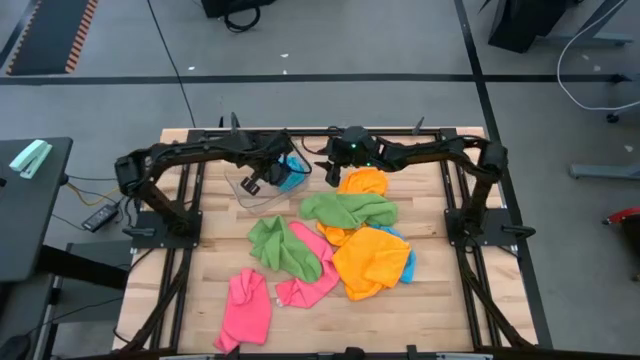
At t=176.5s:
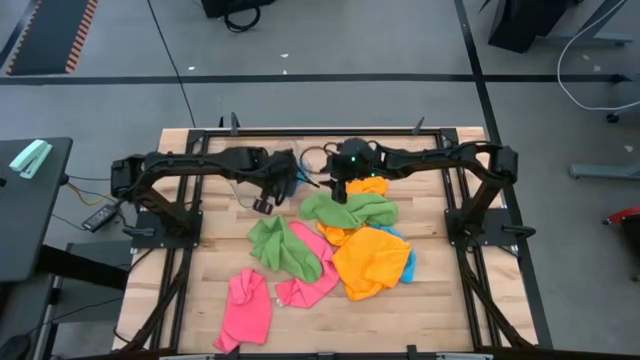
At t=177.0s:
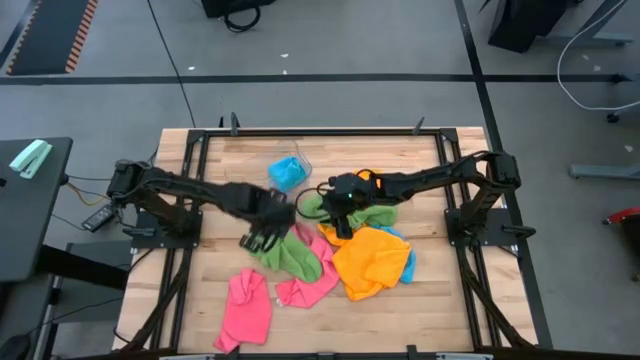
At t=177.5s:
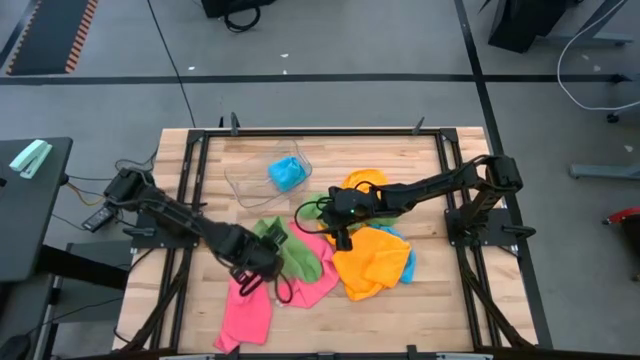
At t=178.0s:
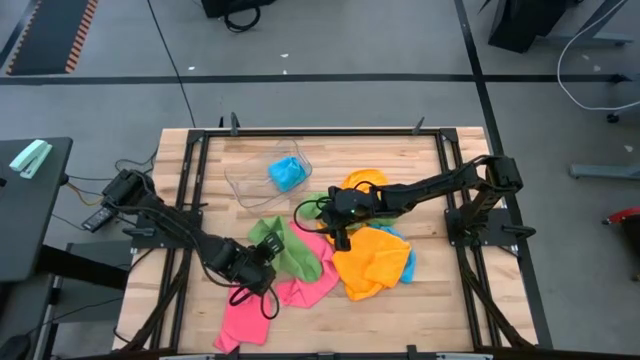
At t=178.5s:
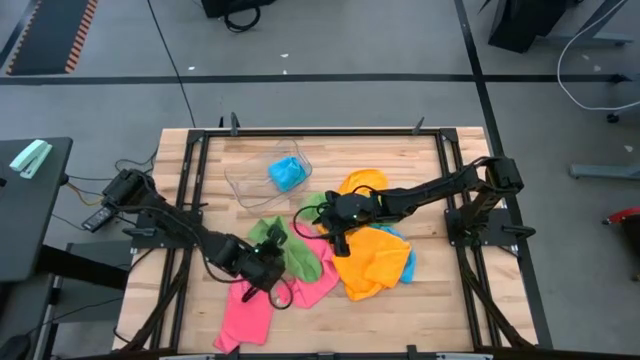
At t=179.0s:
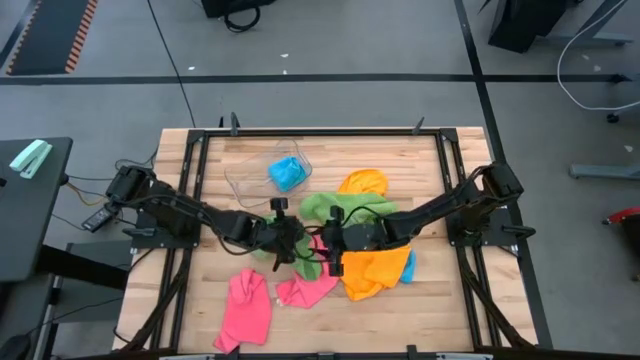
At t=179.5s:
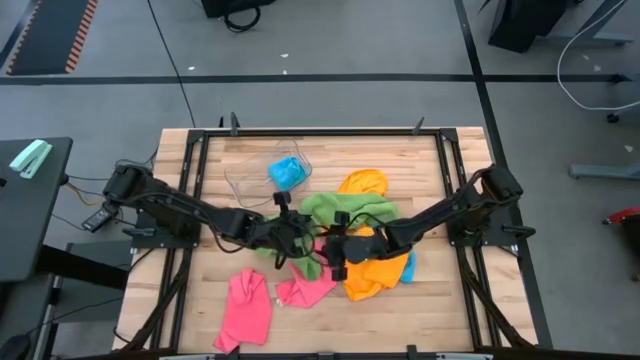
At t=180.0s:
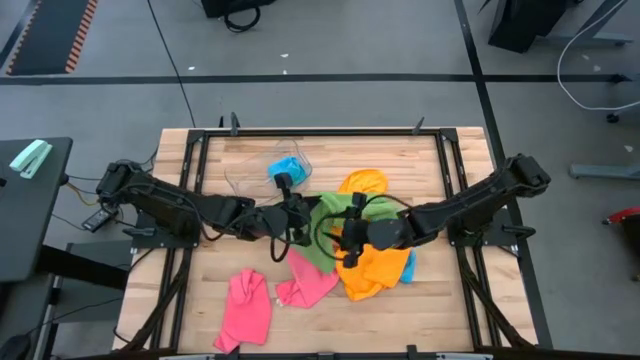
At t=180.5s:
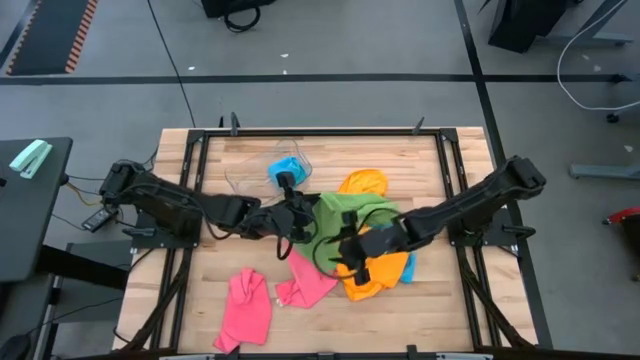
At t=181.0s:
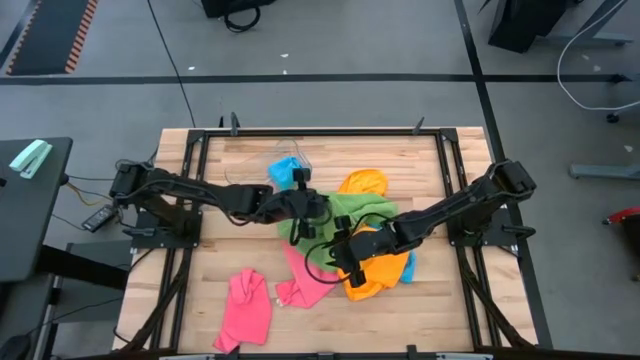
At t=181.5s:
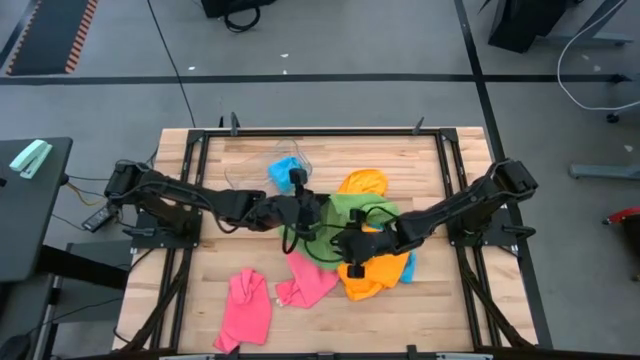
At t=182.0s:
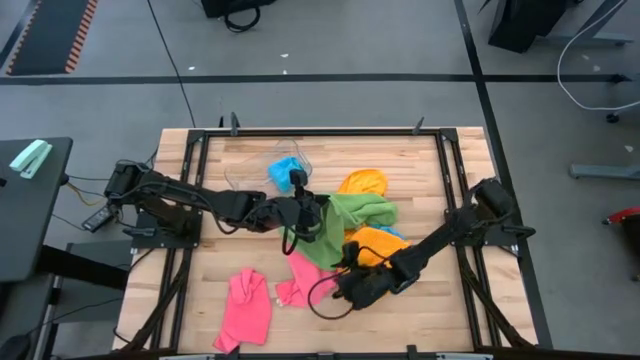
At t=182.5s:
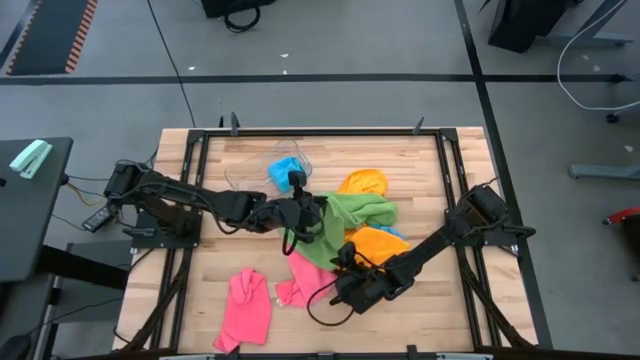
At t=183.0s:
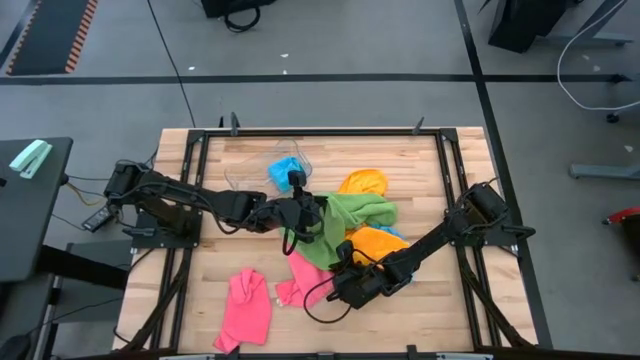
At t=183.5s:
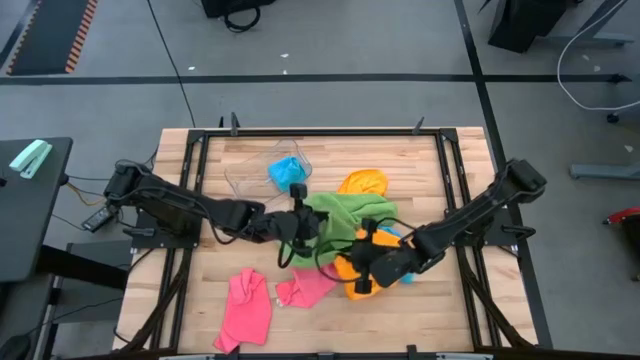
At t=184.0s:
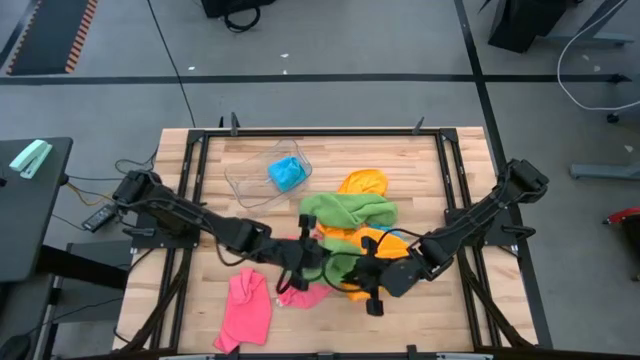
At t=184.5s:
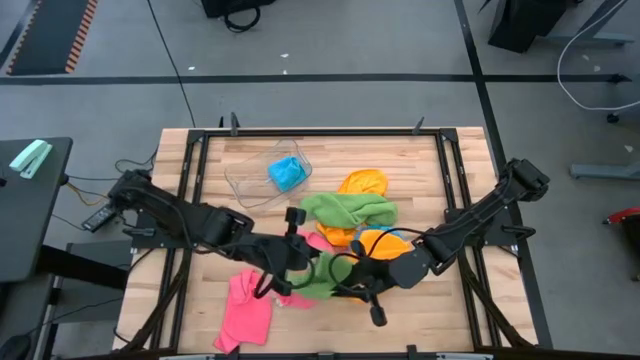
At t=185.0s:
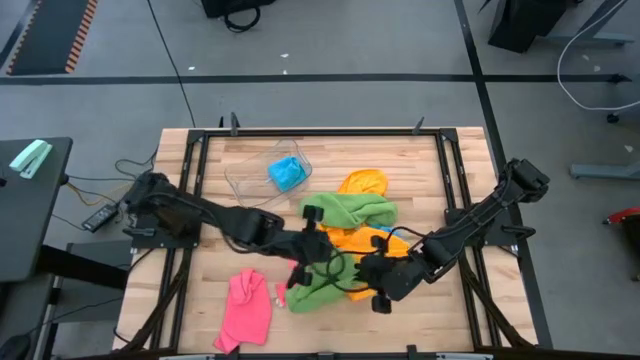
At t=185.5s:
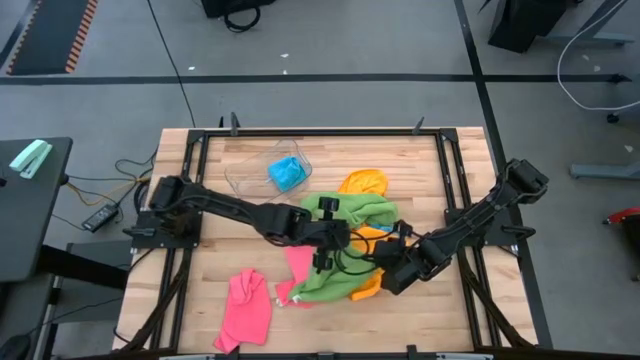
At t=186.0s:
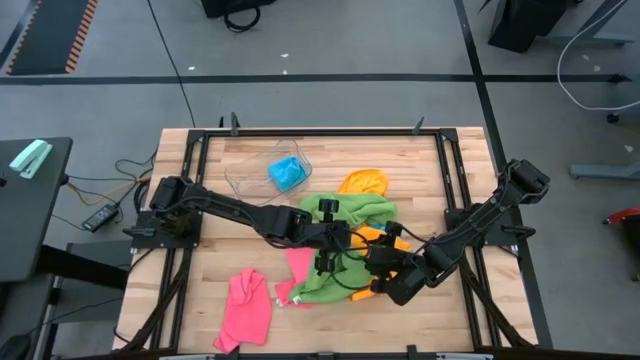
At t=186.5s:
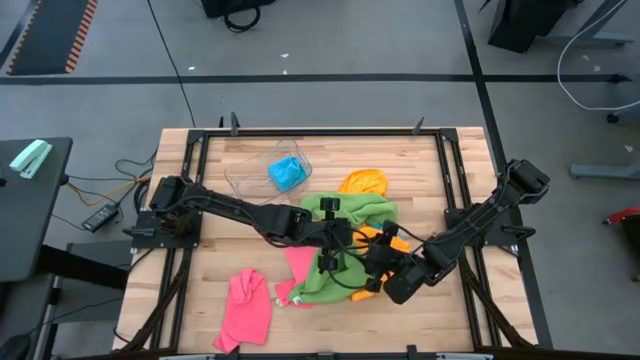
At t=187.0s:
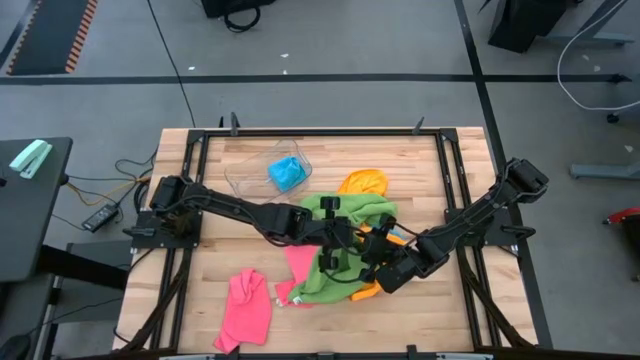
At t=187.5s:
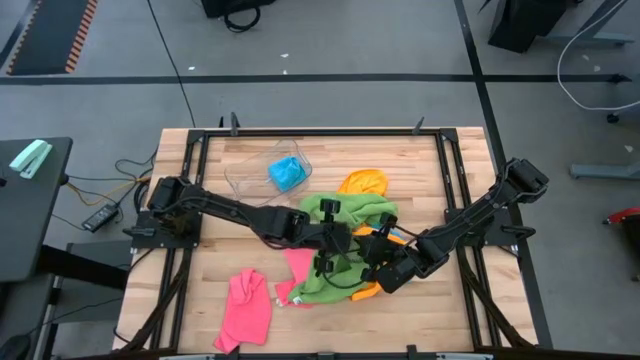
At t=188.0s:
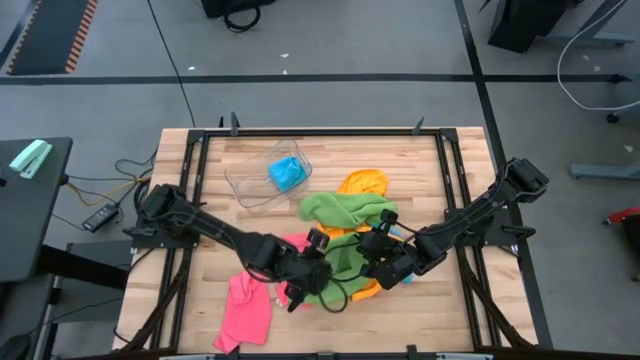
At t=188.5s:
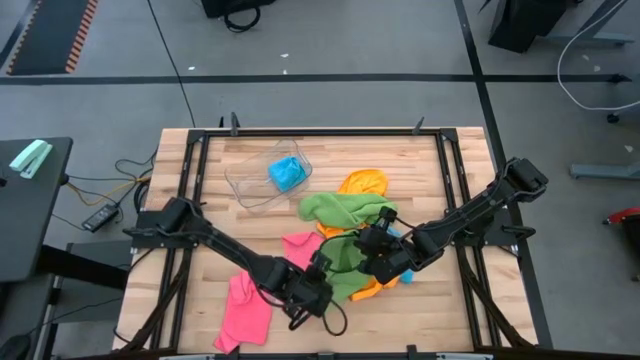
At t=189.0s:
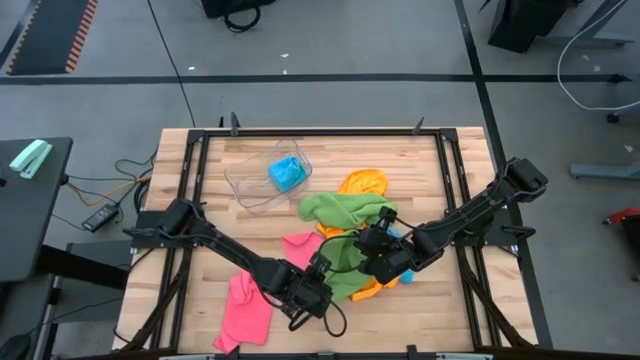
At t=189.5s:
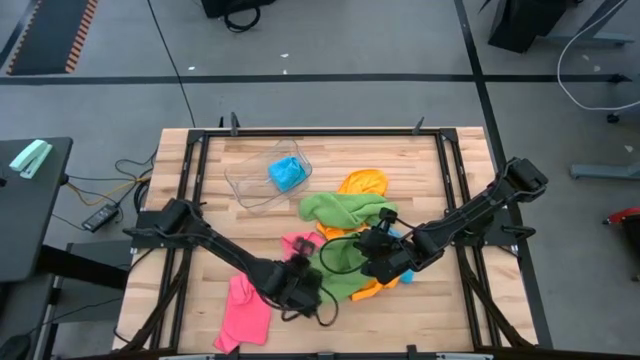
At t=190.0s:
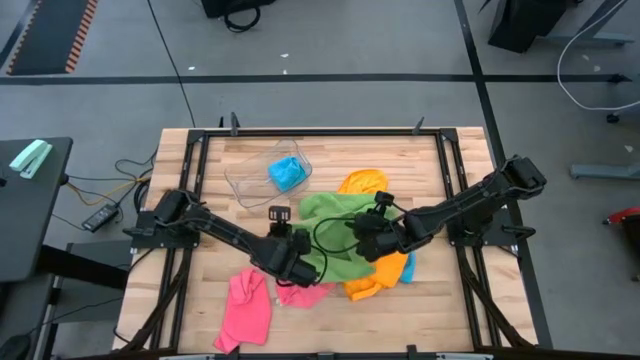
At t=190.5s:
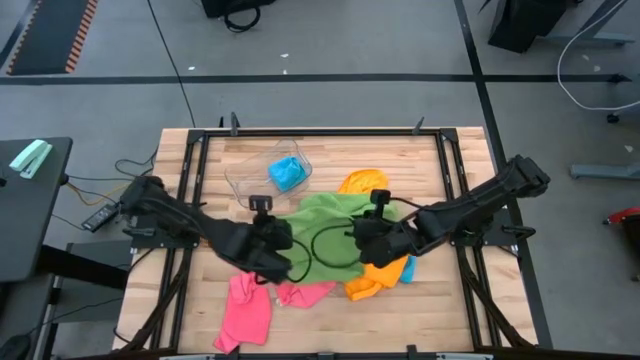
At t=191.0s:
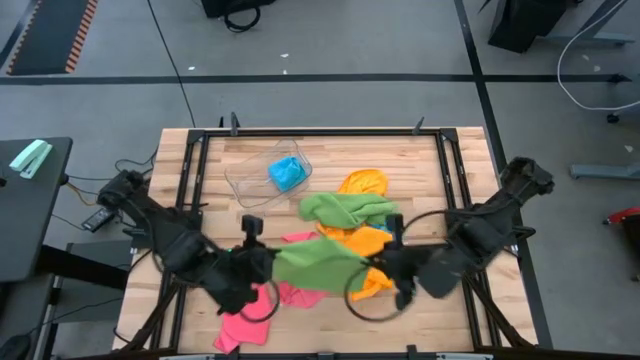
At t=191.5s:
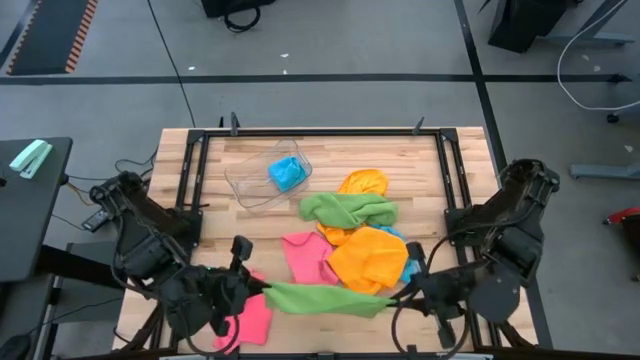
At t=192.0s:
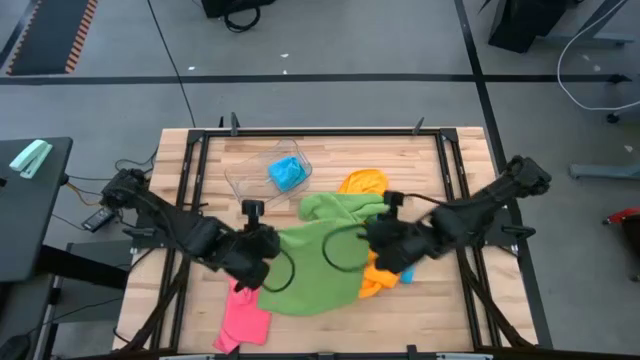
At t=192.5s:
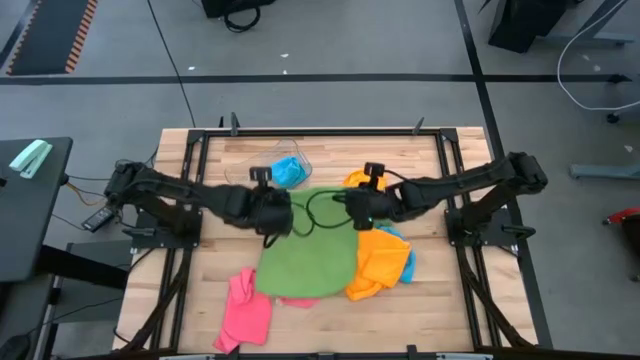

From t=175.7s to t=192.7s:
Task: Fold microfiber towels
Fold the left green microfiber towel

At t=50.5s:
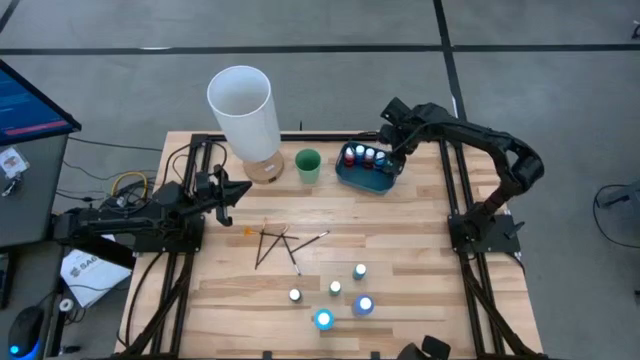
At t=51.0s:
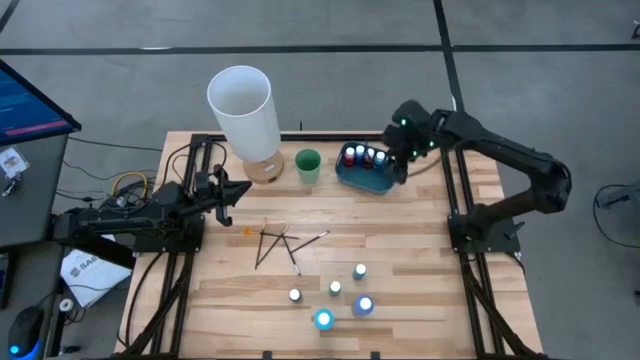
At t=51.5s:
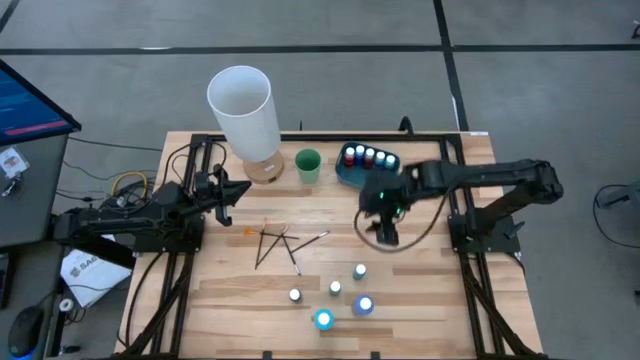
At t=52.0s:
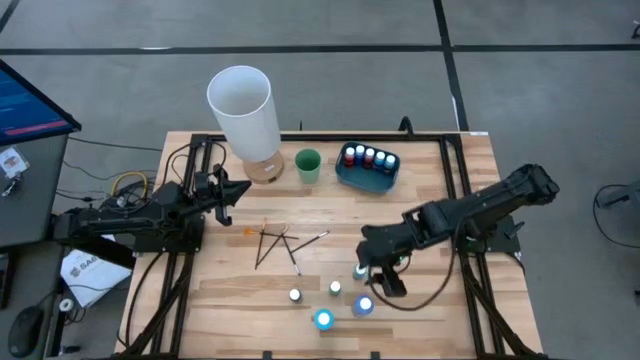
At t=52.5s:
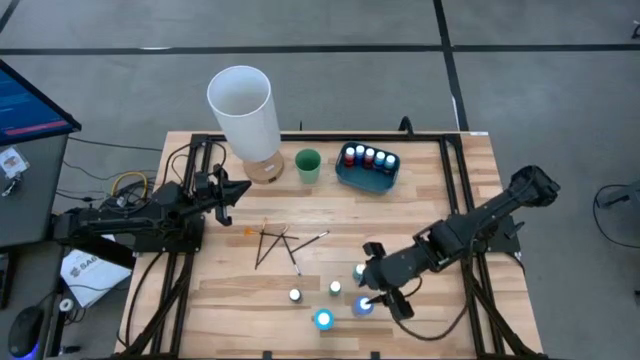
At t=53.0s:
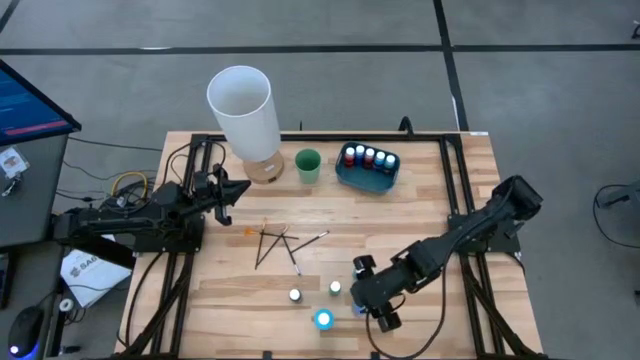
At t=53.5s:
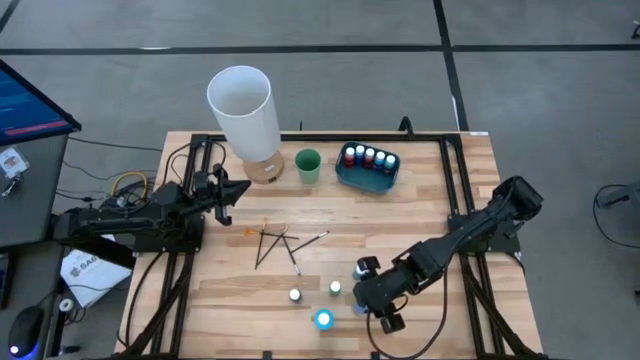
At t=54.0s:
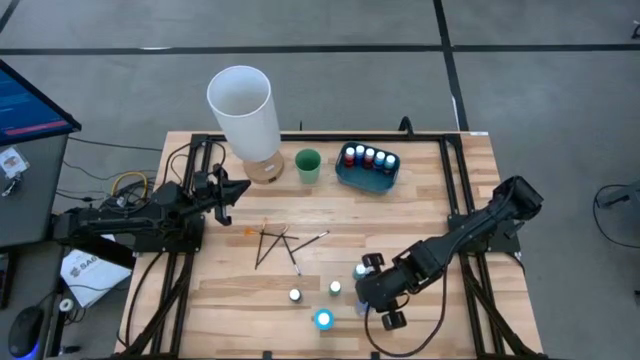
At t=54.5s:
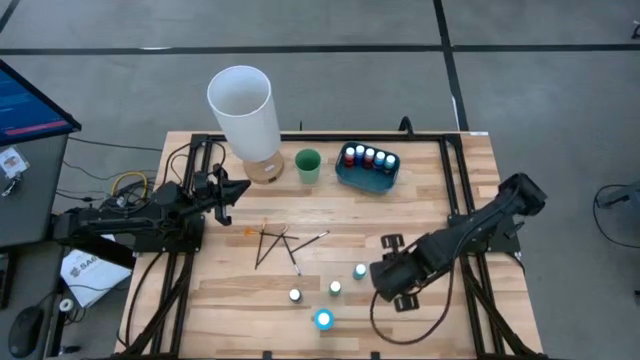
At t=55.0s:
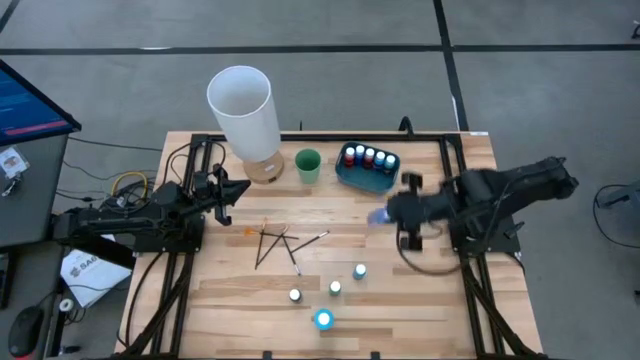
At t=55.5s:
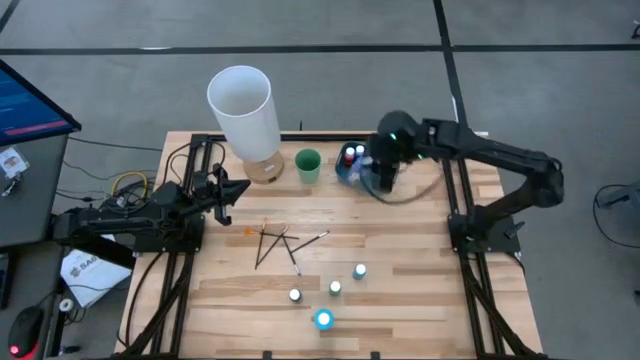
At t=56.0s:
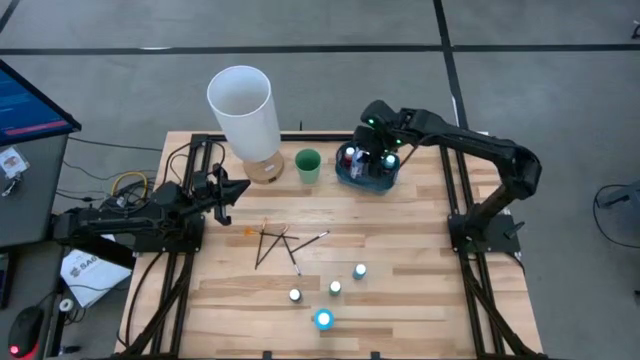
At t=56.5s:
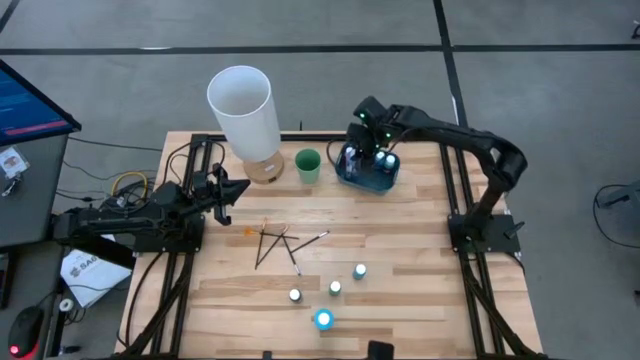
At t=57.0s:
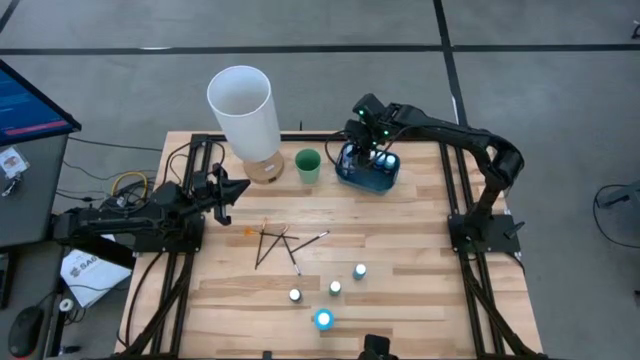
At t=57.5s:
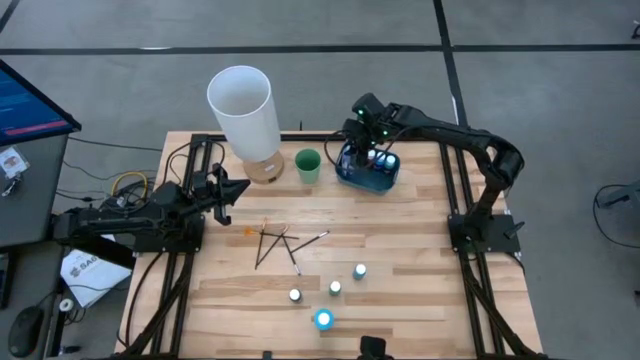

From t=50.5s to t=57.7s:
Task: Pick & Place Paint Supplies
Put the large blue paint bottle into the blue bin
